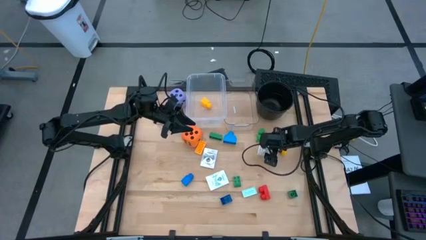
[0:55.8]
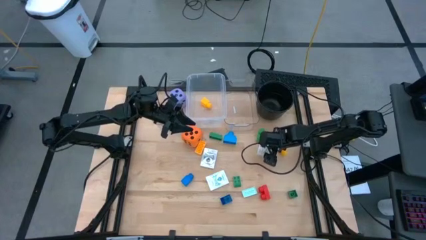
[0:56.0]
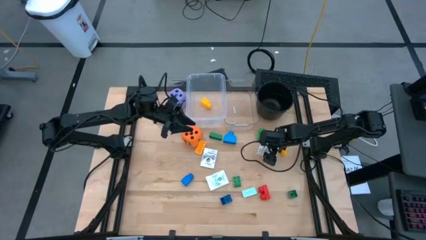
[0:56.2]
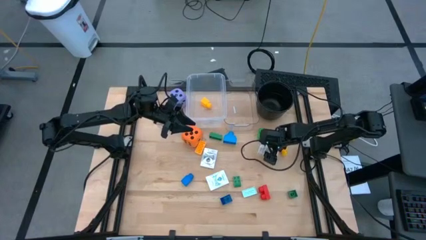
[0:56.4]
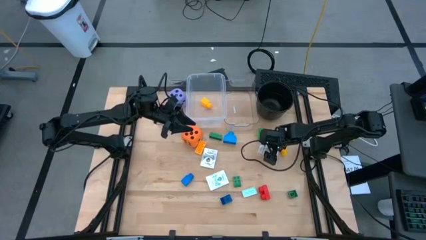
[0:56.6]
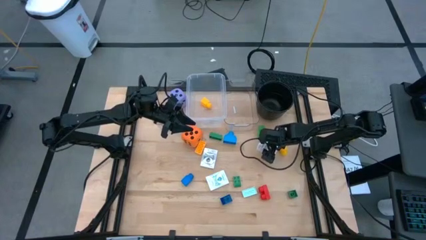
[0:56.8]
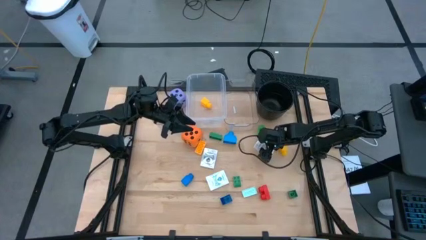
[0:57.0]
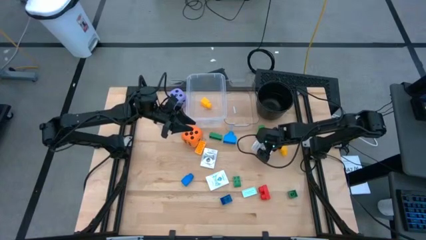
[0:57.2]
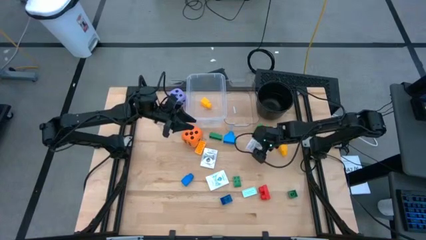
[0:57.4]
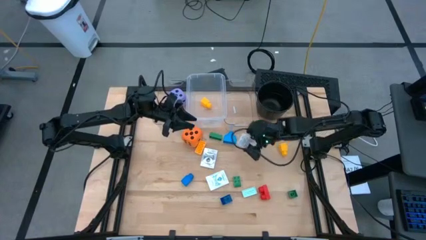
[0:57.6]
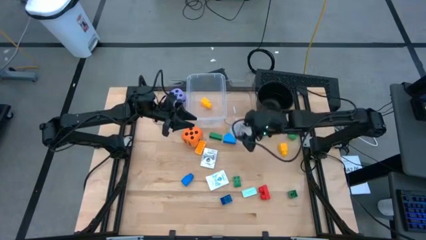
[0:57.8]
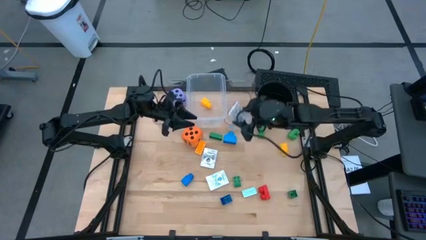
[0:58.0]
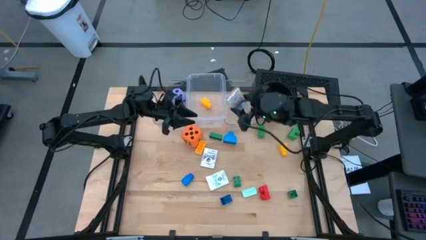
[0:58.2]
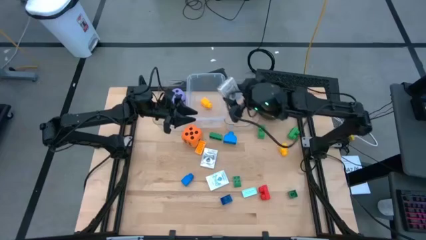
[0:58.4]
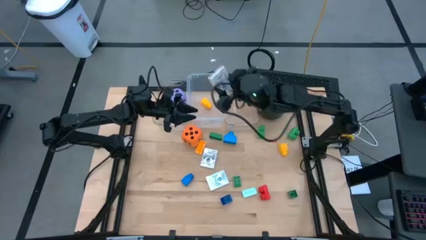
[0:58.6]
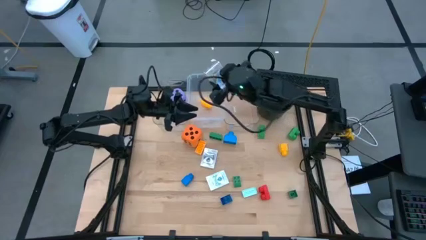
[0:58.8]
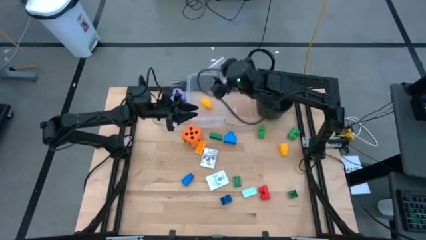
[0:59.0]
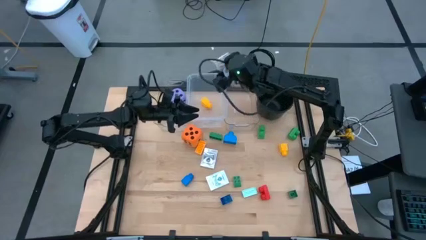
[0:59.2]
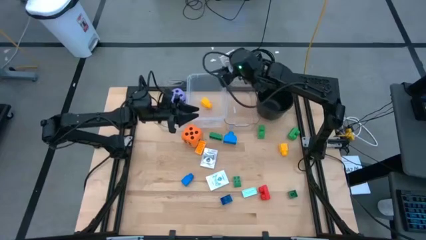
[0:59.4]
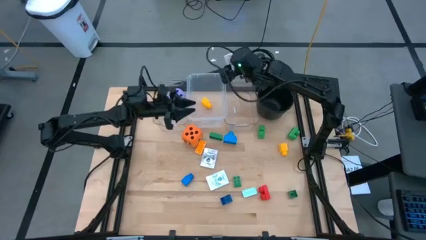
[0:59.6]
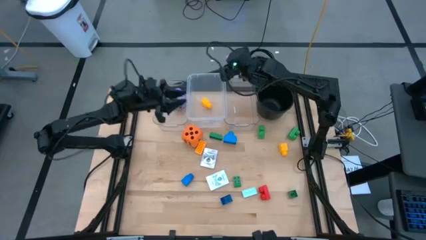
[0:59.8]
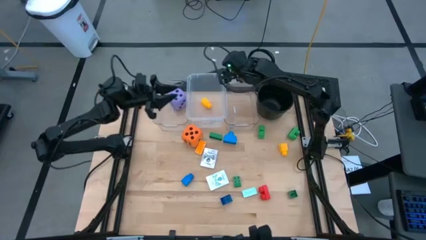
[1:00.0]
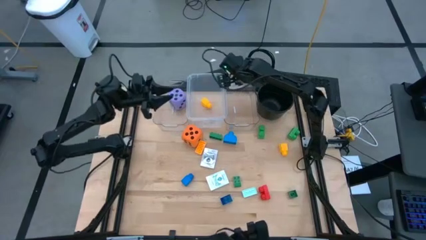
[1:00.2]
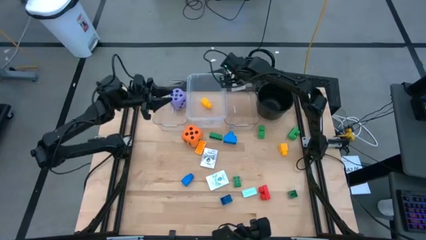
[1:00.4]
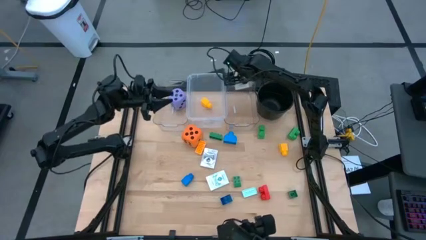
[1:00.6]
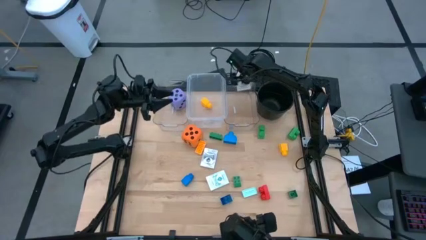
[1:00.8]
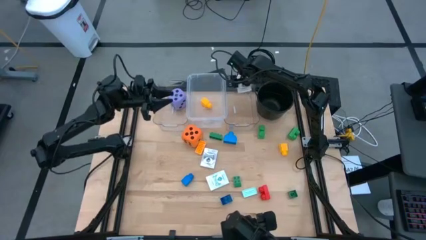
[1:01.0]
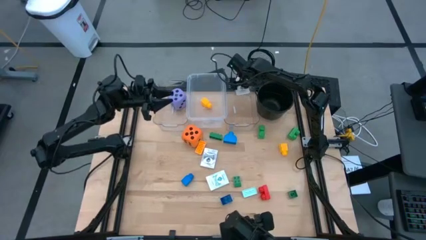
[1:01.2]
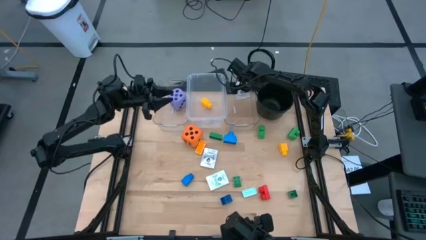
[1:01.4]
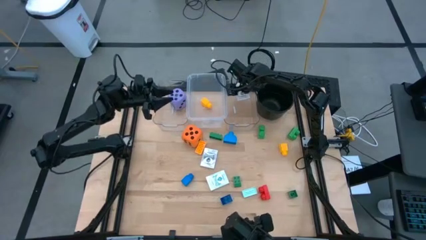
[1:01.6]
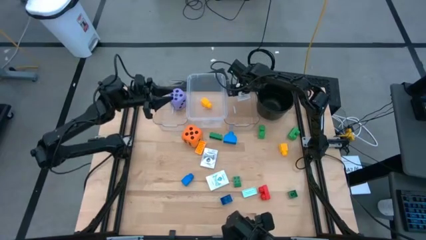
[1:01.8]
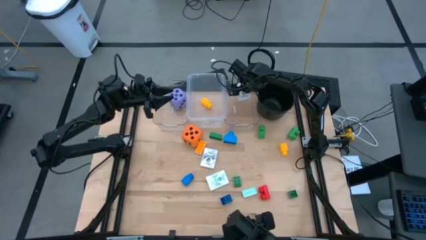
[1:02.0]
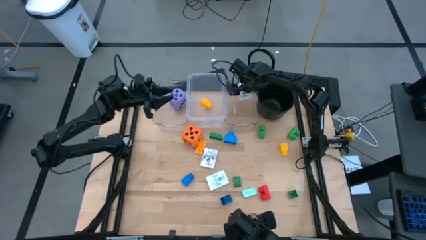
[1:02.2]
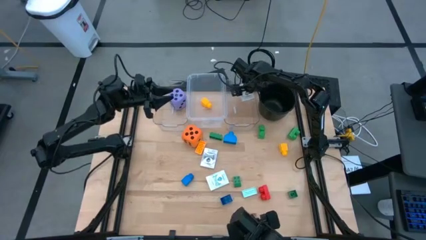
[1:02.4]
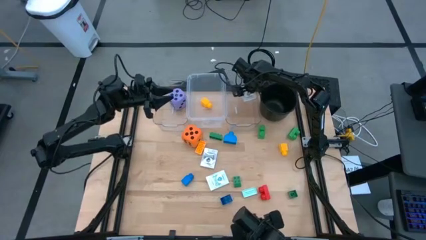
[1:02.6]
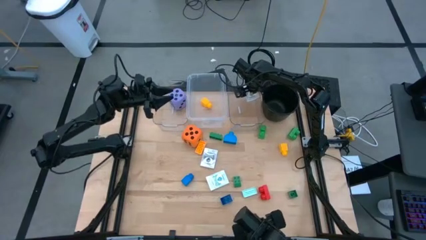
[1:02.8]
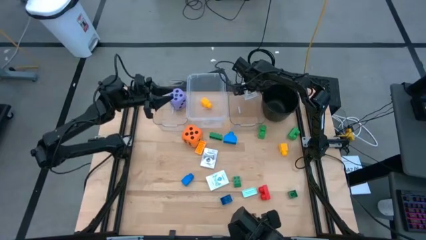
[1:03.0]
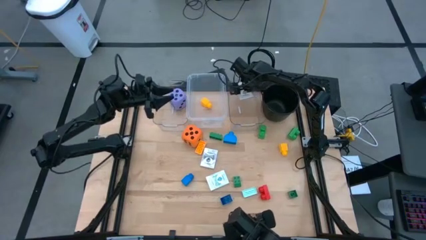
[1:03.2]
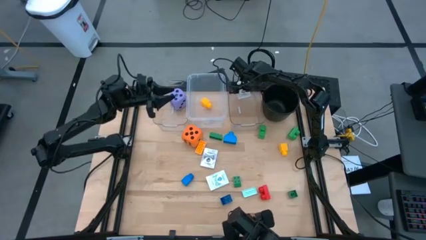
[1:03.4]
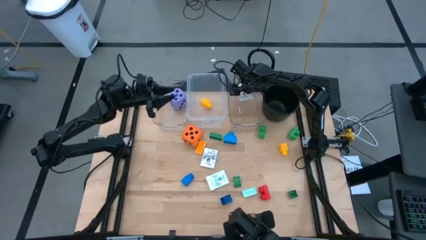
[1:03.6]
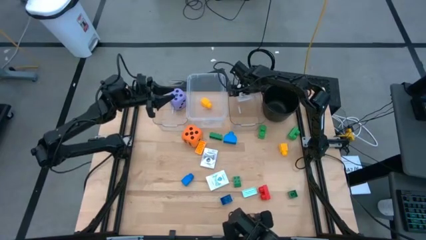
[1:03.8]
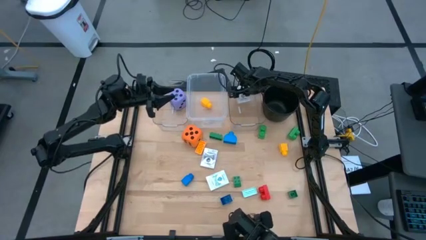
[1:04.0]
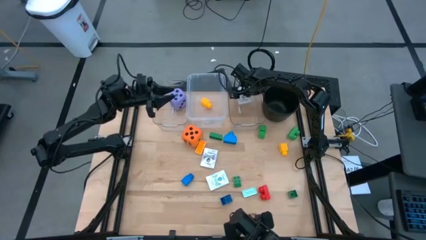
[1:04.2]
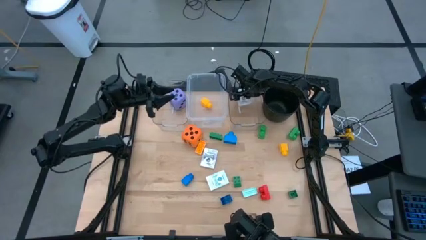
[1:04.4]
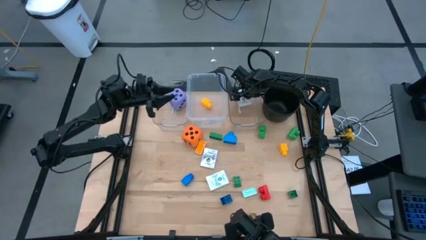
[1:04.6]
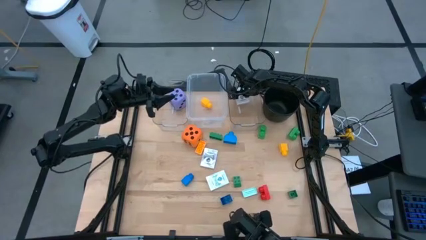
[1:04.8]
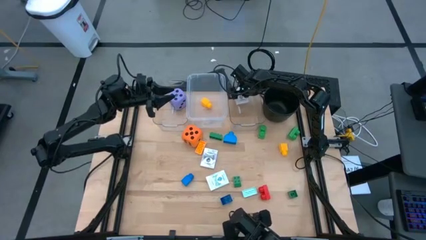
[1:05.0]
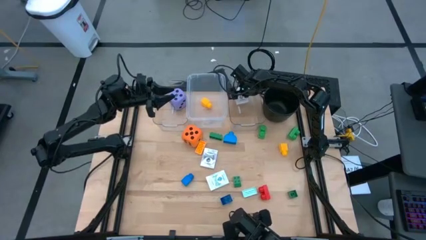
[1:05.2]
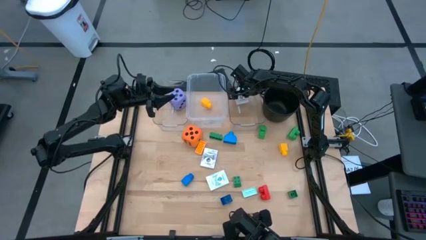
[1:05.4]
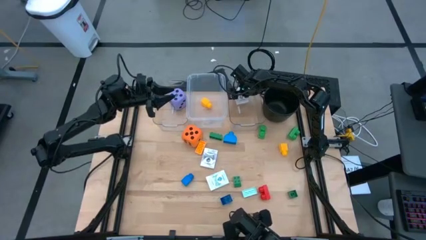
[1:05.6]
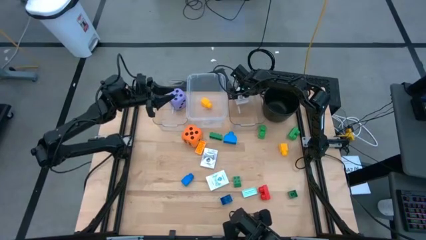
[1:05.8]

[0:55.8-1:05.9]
Task: Pick & Place Toys
Put the brown playing card box into the right transparent bin

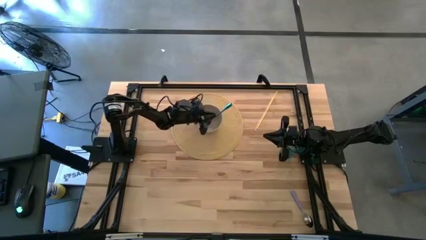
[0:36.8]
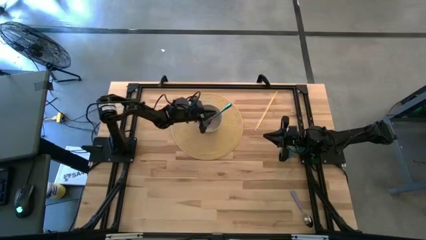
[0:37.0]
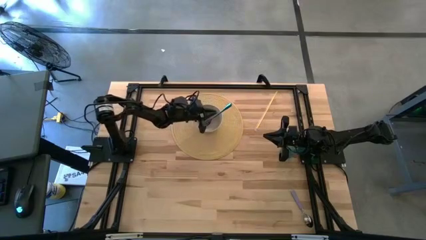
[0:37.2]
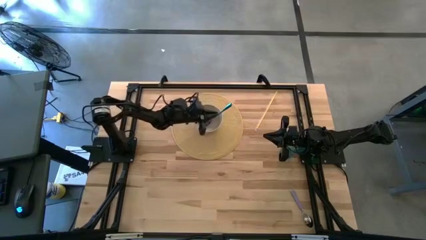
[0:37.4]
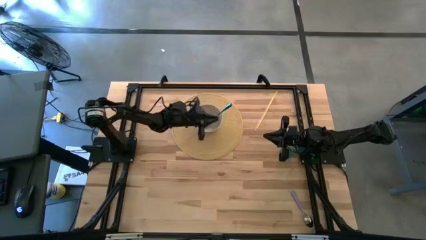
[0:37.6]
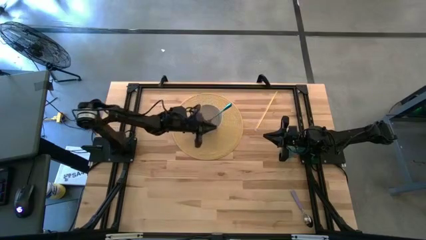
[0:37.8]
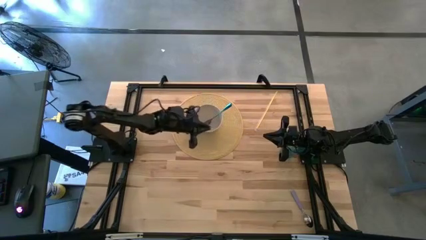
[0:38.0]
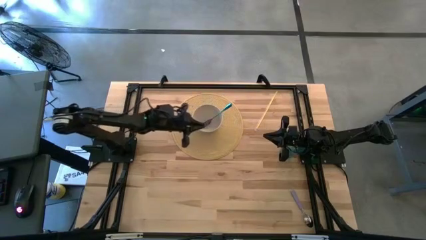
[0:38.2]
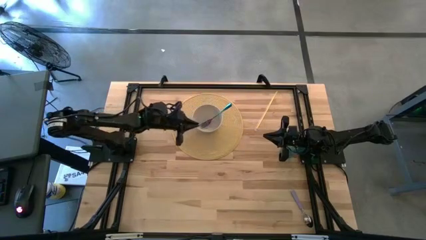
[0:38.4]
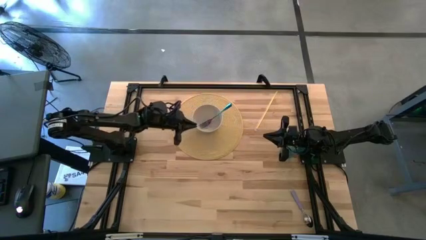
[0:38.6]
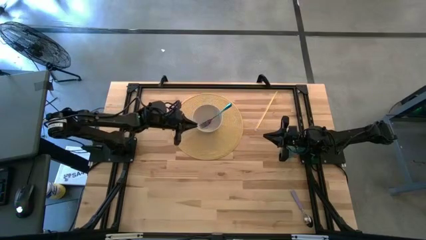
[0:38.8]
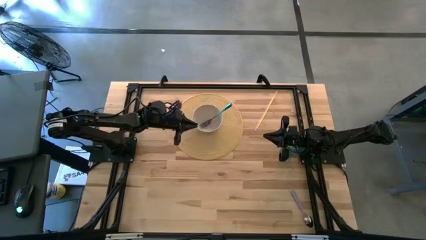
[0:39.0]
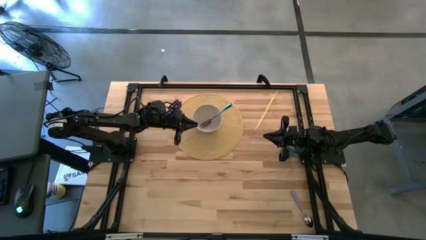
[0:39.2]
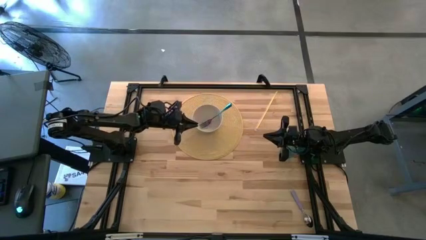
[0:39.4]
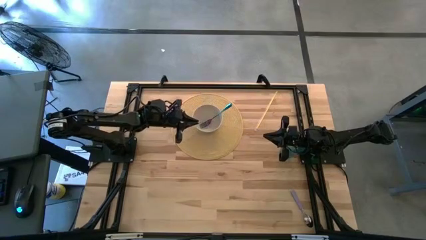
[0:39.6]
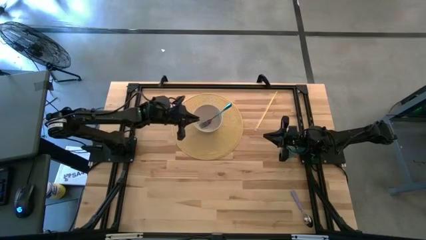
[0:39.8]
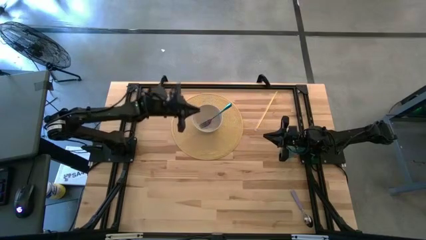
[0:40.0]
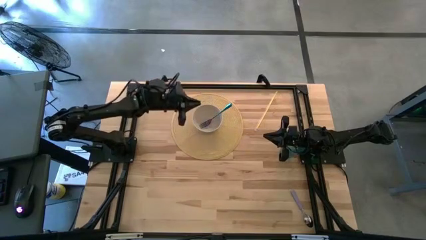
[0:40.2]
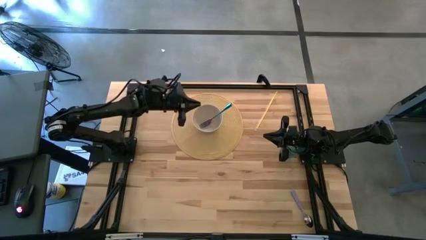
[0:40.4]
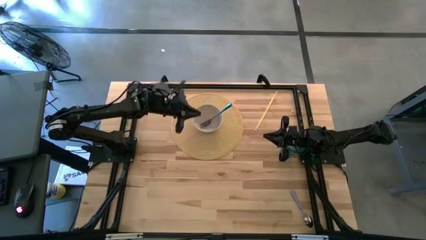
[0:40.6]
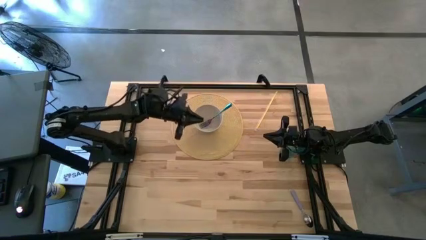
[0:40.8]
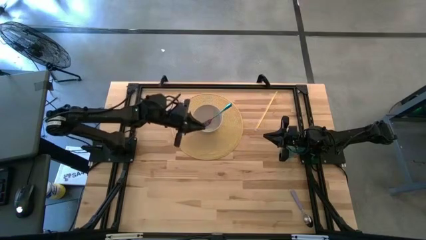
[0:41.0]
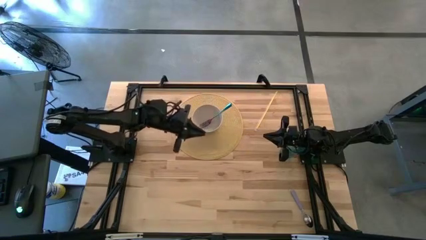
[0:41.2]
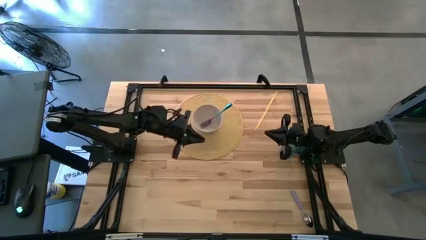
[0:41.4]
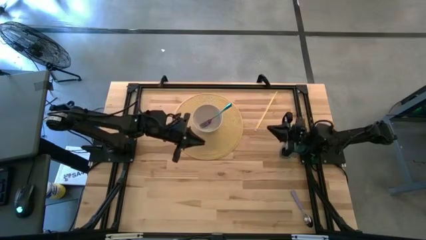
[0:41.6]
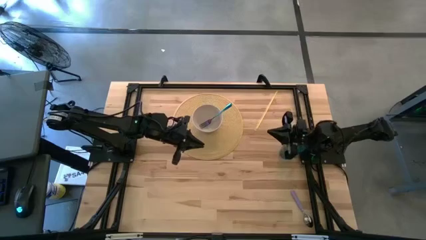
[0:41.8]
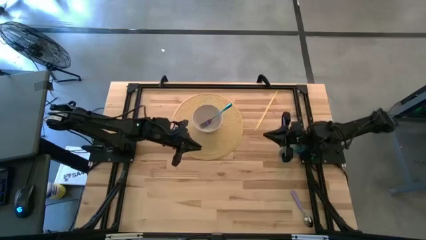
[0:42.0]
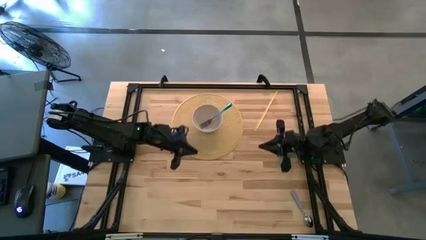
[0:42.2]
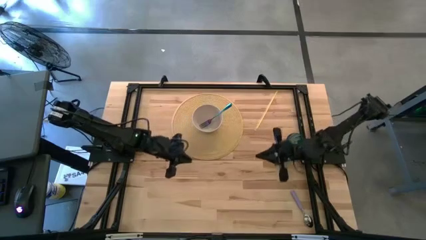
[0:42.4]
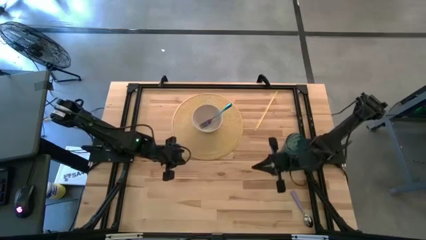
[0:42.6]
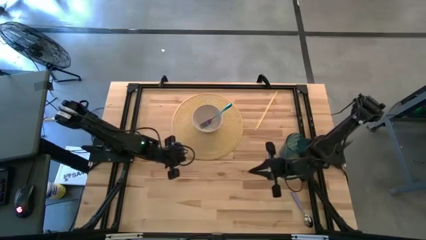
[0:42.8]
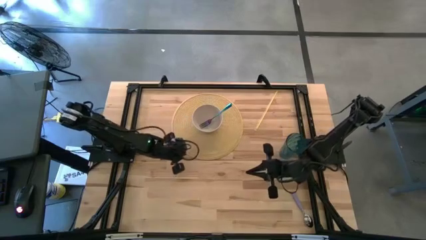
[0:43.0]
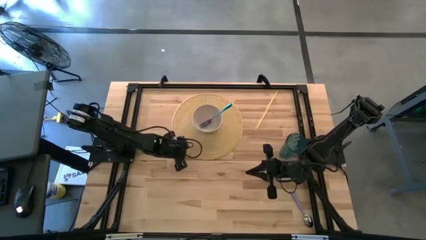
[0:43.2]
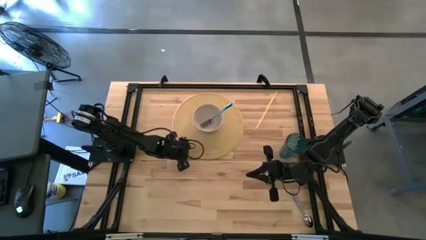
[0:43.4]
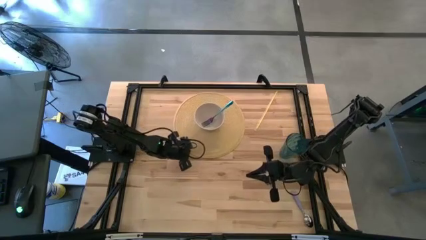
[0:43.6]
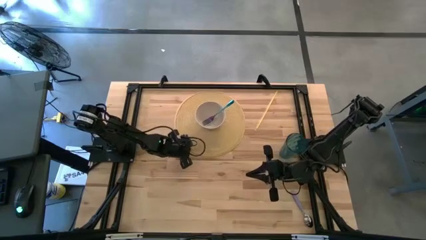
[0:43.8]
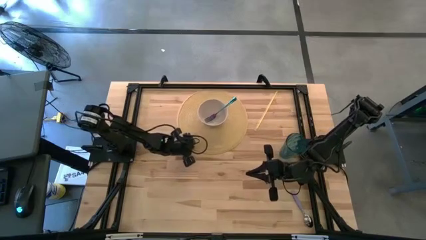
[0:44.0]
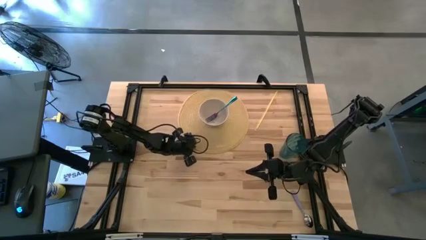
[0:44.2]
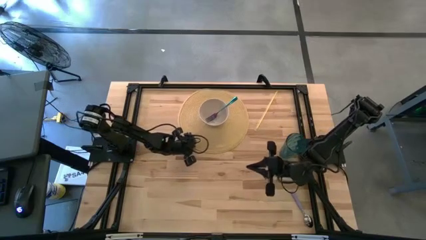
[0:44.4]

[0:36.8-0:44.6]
Task: Pick & Place Utensil
Adjust the brown mat on the table
